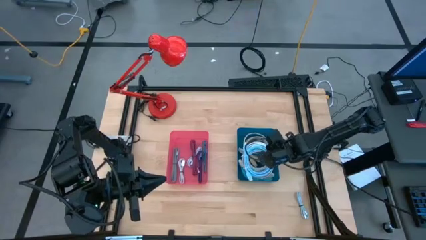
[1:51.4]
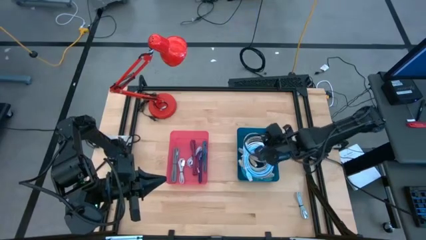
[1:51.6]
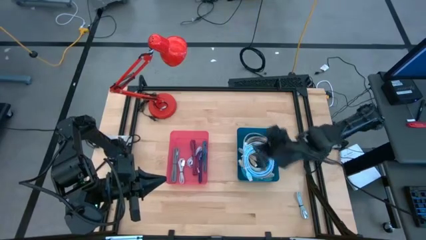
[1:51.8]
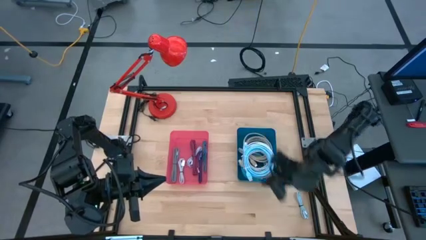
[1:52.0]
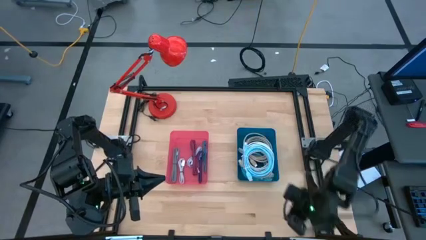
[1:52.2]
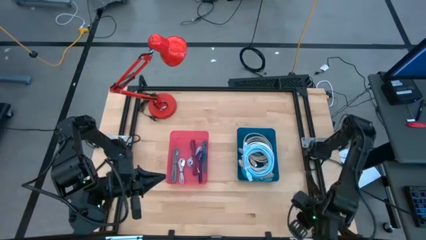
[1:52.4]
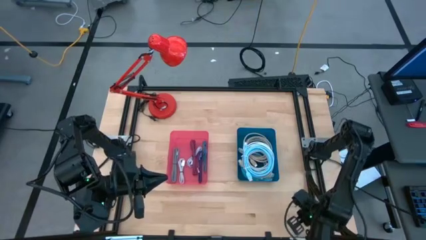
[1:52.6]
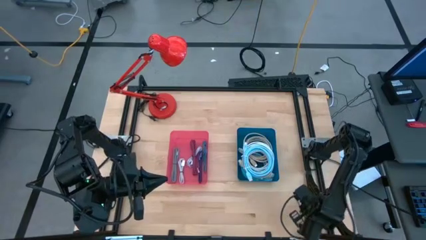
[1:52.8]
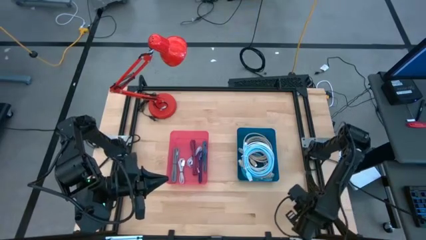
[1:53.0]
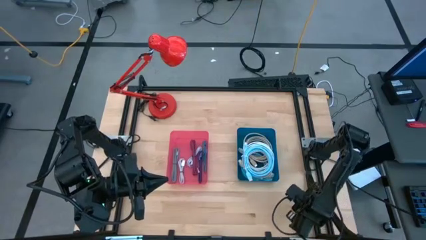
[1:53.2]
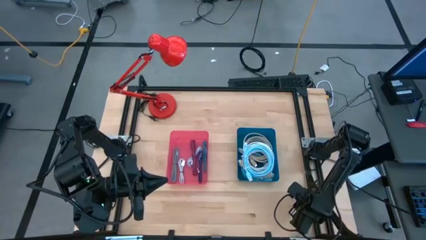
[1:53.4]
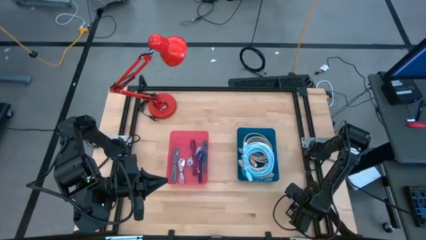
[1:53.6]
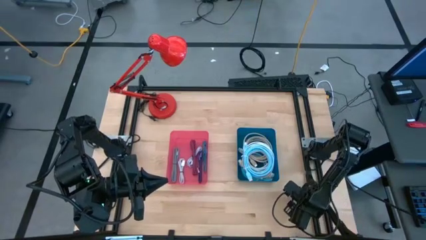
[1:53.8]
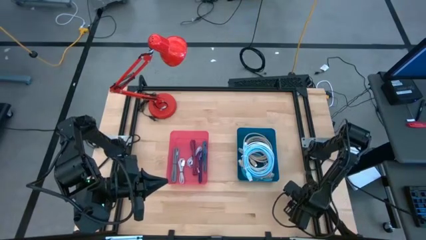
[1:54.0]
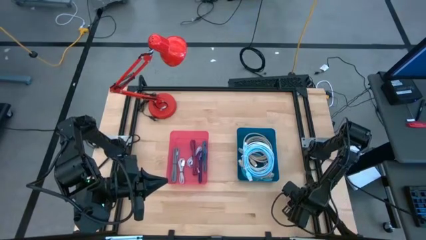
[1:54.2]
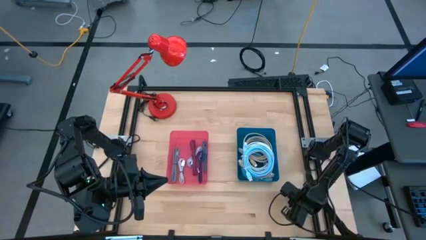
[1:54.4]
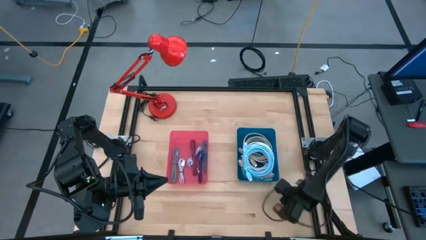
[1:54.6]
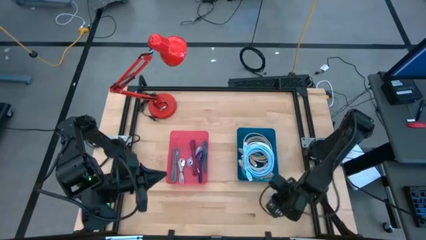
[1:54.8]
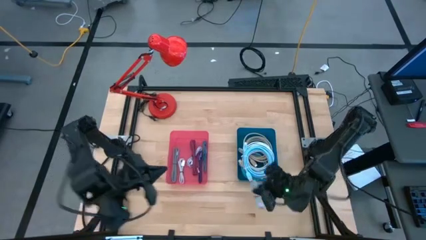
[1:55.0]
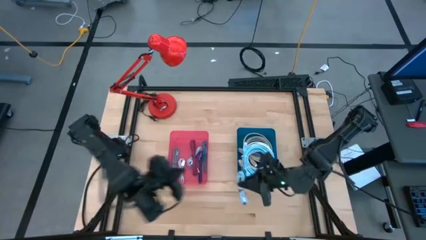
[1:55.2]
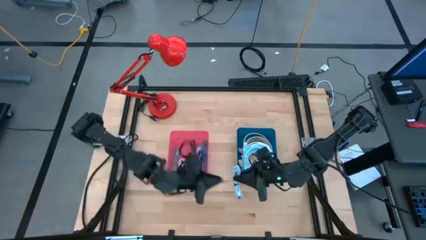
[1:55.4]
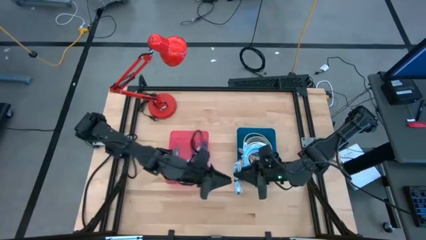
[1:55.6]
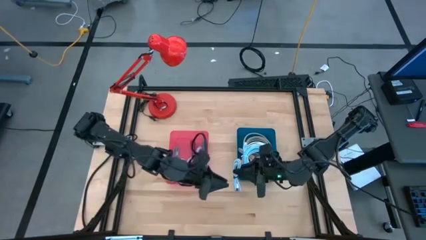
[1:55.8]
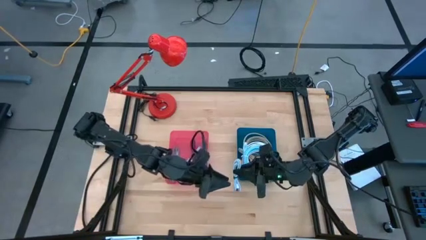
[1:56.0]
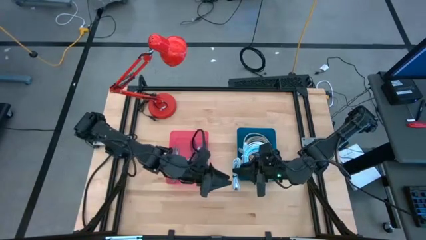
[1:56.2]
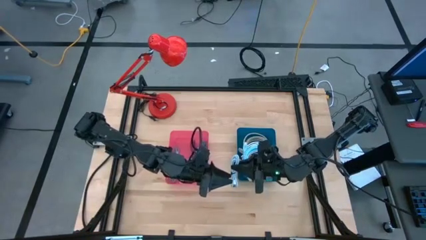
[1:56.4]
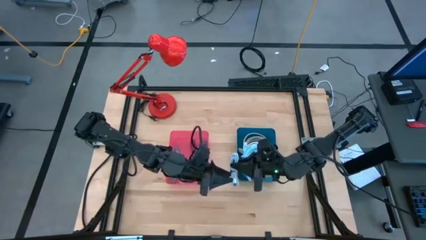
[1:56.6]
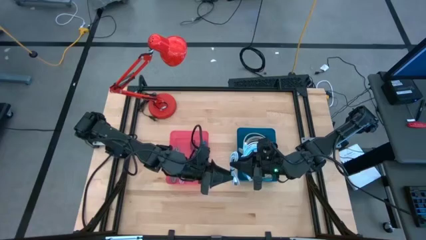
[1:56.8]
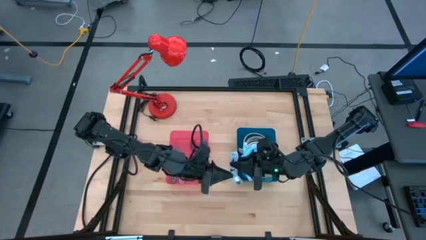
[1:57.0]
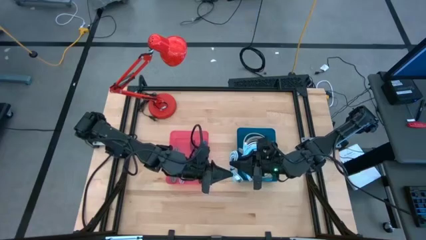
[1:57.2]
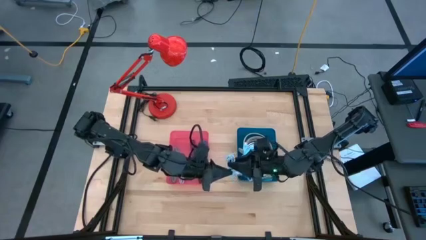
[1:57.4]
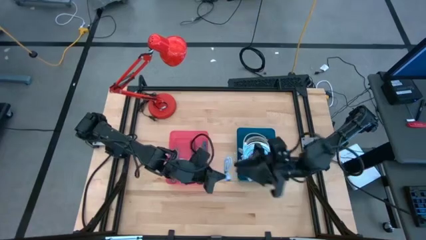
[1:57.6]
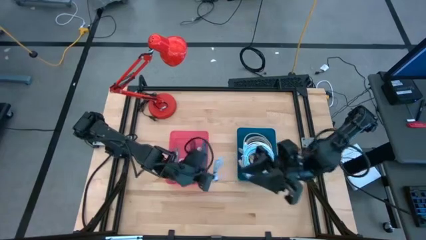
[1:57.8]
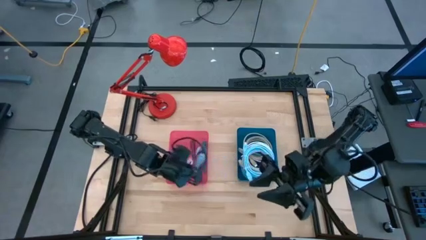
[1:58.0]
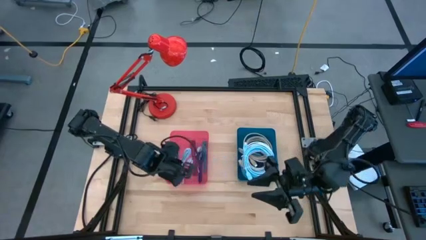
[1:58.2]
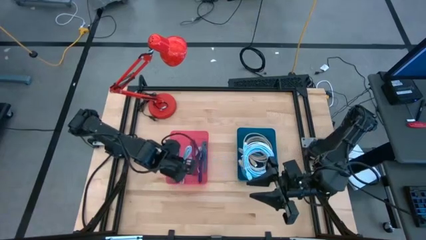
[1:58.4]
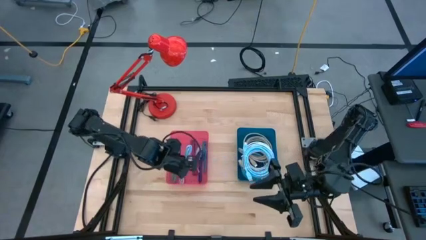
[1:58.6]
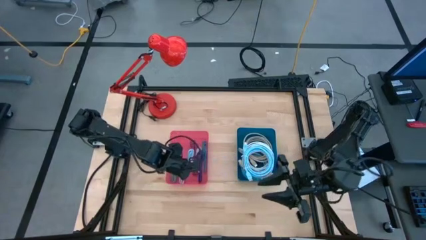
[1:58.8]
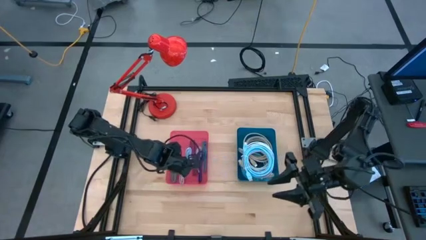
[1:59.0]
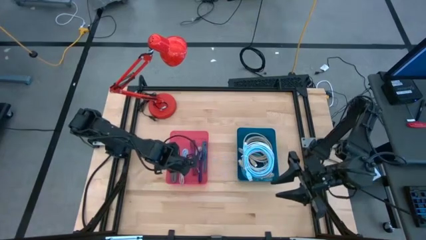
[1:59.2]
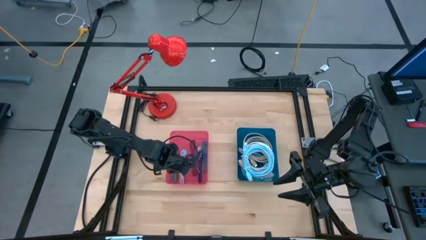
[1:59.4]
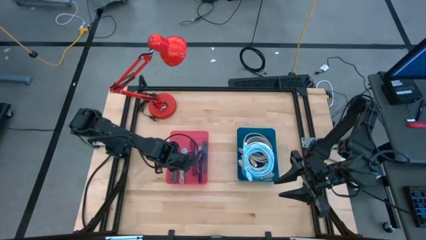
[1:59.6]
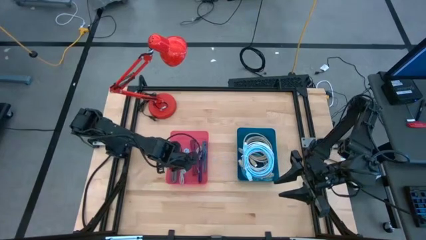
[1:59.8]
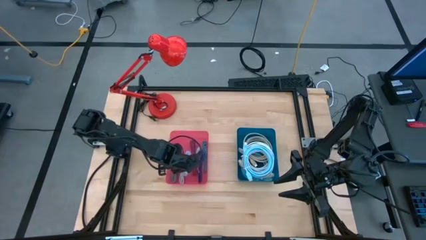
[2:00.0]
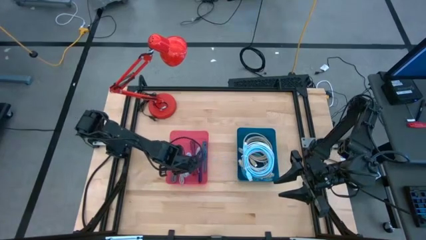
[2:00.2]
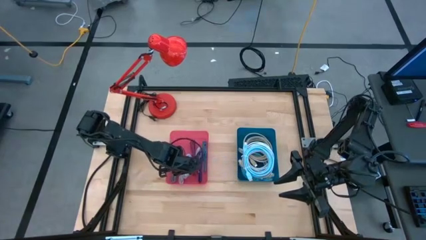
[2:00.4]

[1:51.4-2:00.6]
Task: Pick & Place USB Port
Put the white charger cable into the red bin

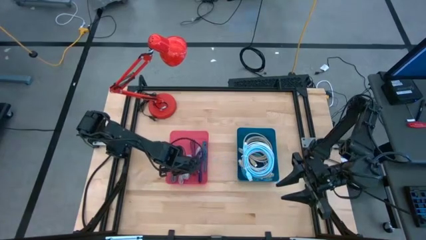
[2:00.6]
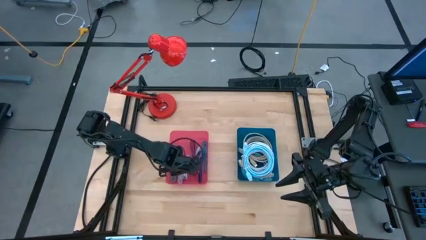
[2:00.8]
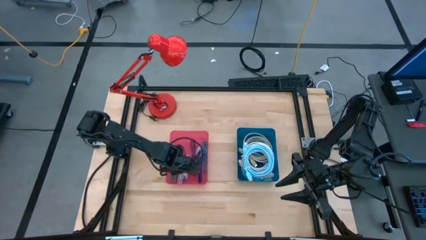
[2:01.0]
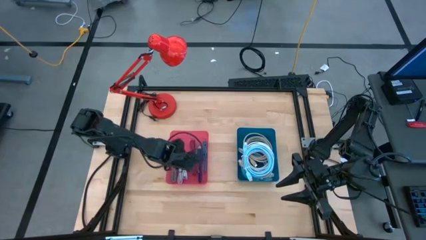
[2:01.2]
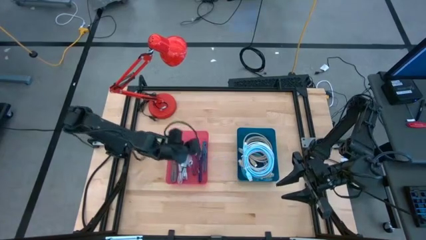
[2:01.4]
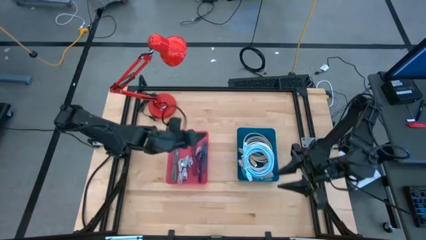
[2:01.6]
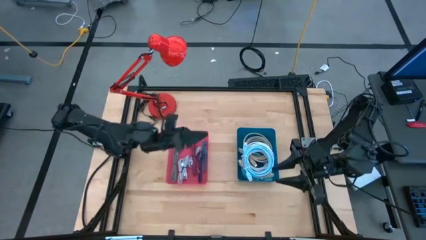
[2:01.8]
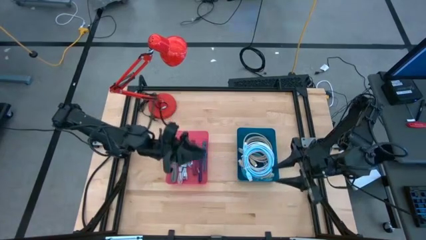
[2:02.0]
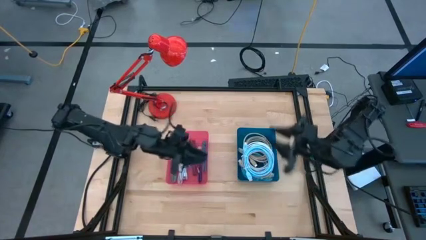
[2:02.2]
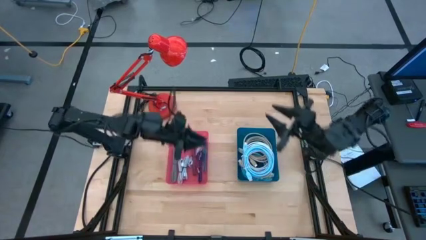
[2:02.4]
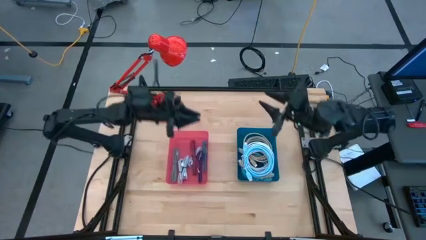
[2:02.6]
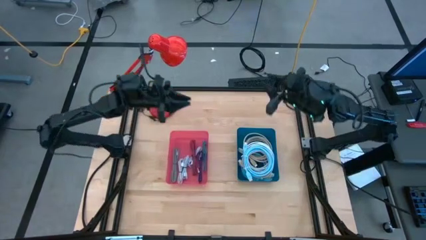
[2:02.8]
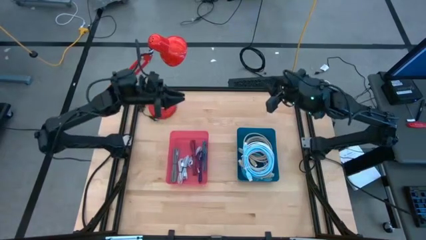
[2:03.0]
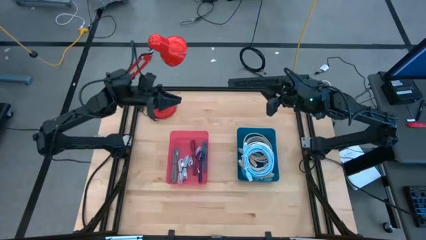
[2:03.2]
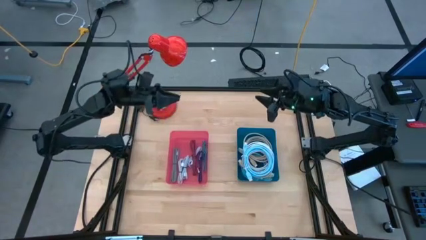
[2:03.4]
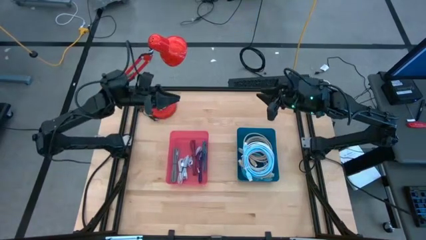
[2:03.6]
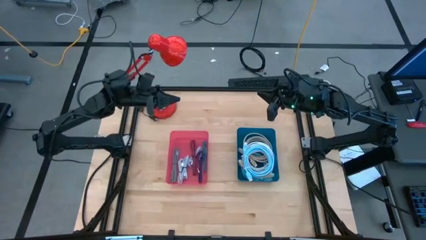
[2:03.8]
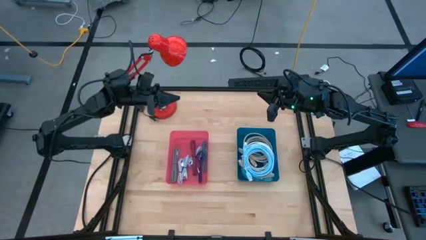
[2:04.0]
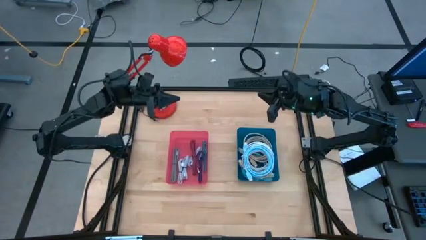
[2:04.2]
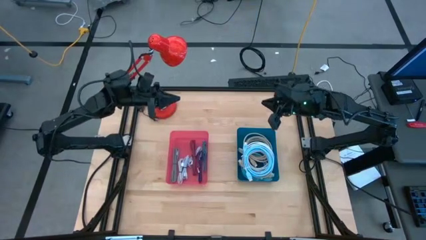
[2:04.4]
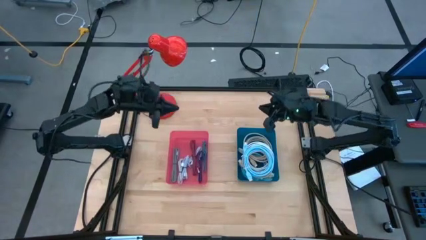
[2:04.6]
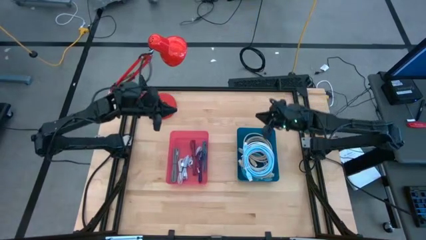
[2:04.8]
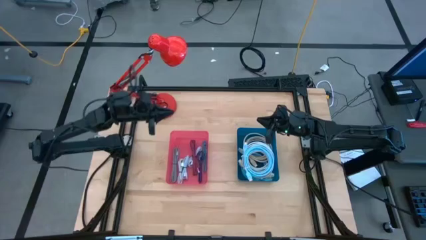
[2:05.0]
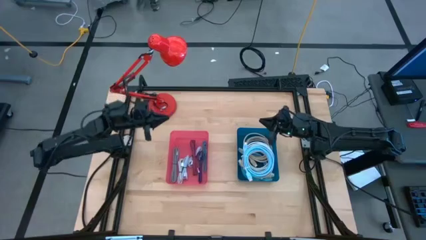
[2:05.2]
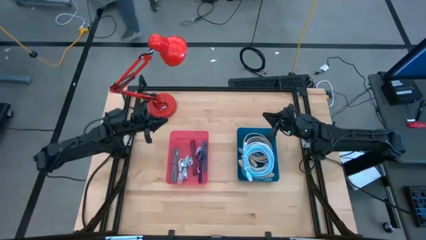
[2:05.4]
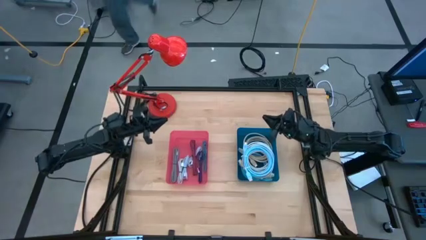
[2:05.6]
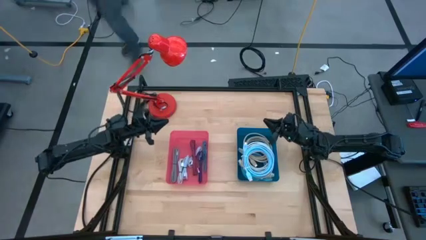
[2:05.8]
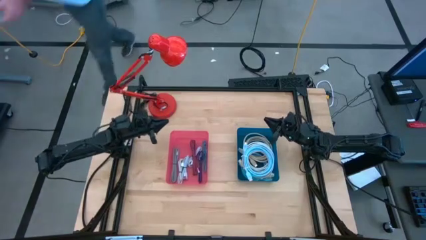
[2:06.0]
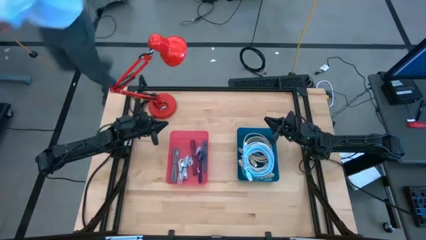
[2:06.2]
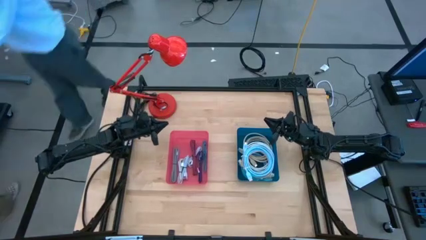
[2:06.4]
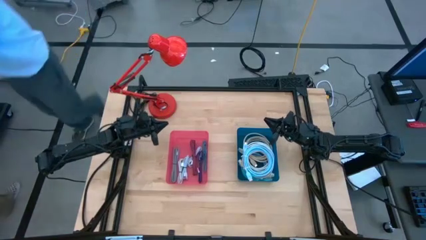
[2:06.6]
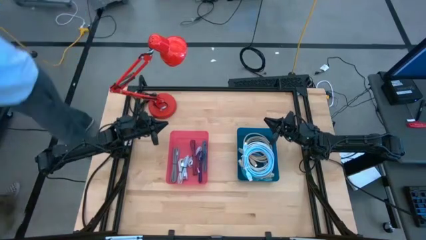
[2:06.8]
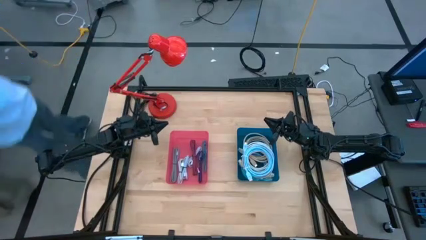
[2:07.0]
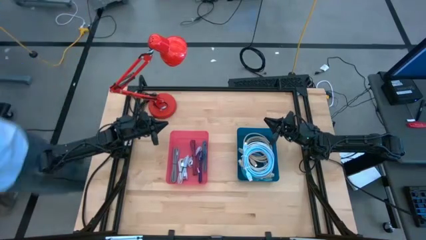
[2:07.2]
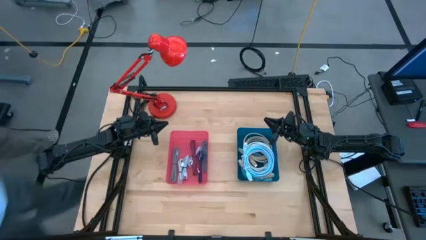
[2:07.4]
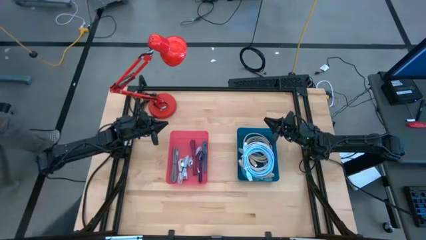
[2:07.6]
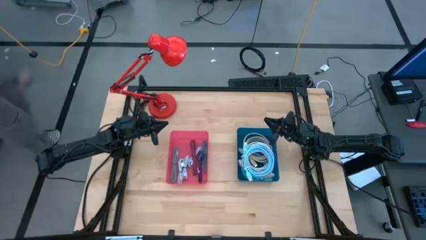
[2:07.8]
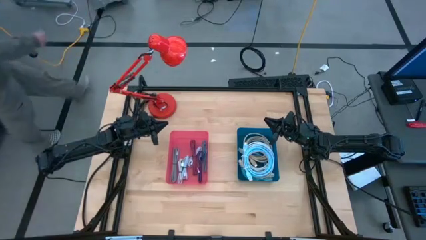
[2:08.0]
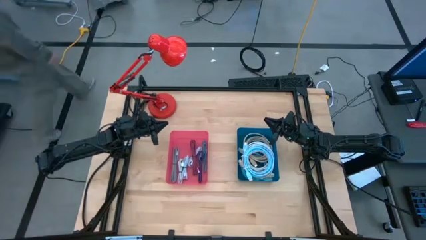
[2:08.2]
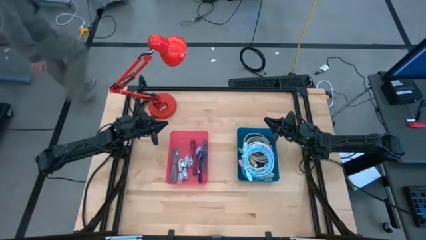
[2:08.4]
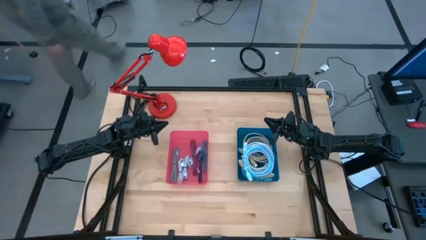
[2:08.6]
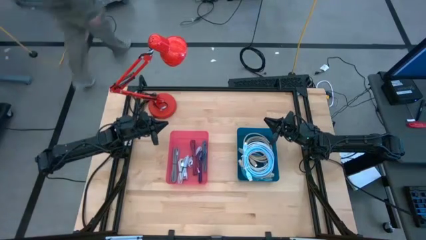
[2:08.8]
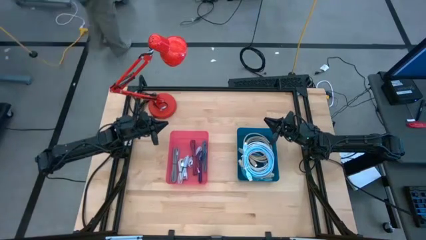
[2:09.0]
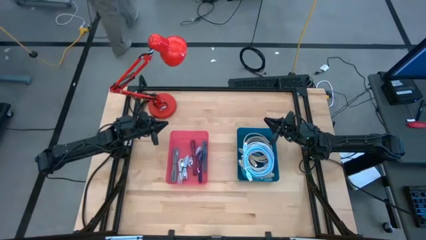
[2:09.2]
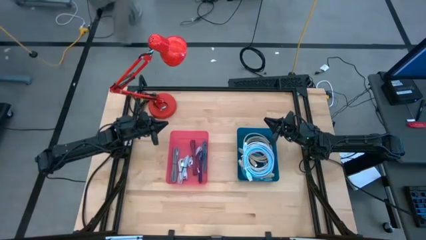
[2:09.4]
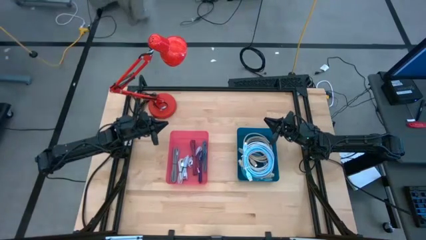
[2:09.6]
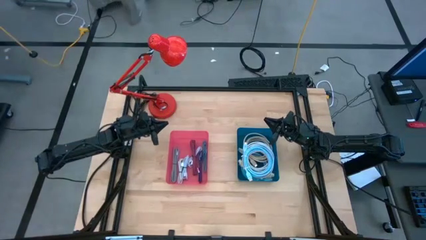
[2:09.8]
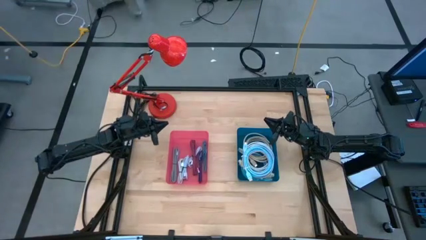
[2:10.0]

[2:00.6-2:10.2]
Return to Home Position
